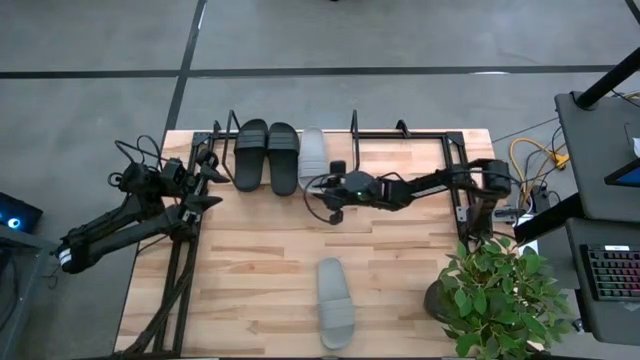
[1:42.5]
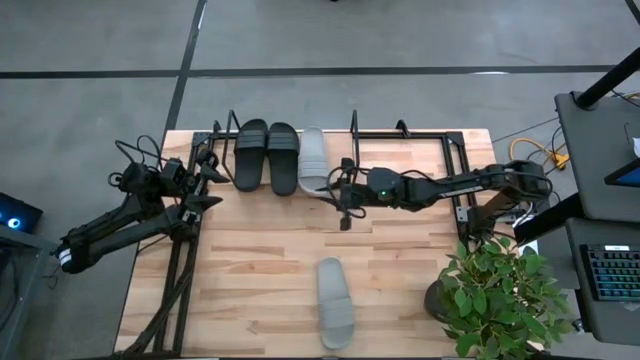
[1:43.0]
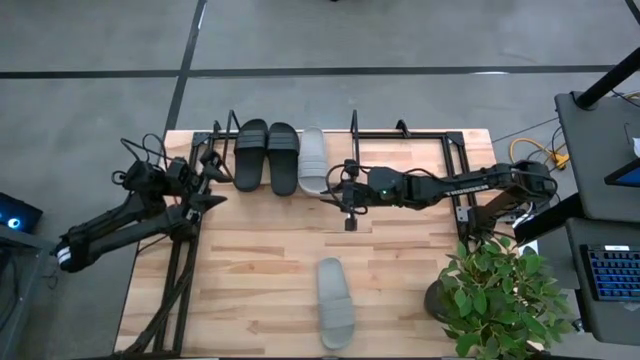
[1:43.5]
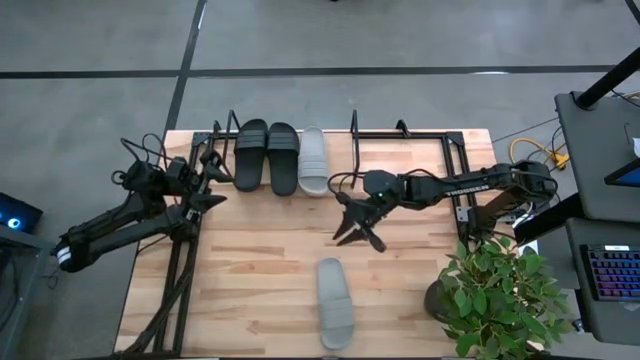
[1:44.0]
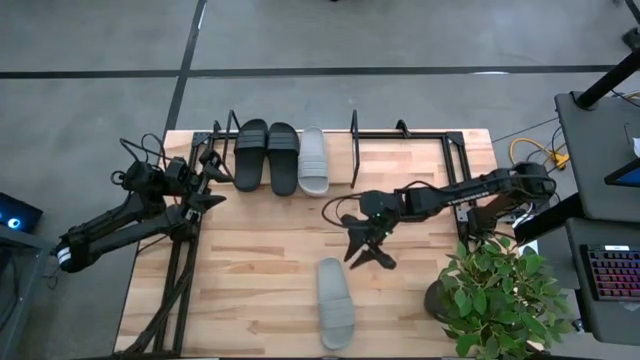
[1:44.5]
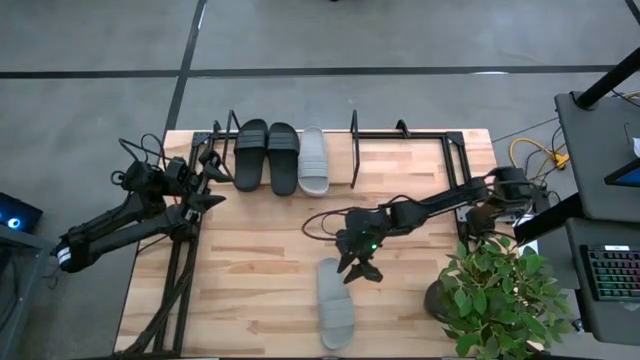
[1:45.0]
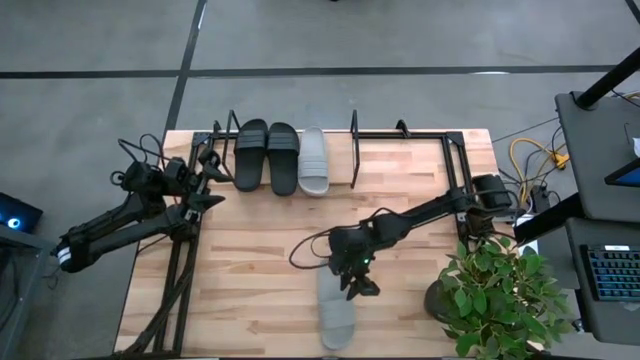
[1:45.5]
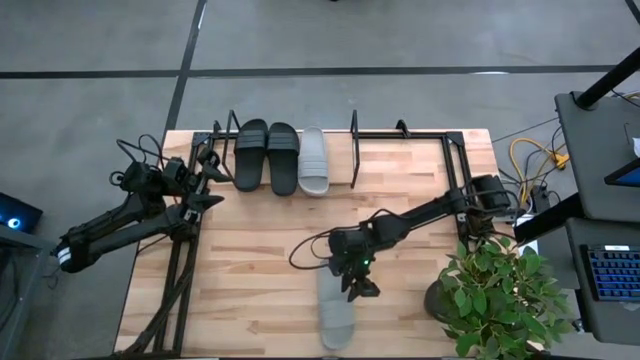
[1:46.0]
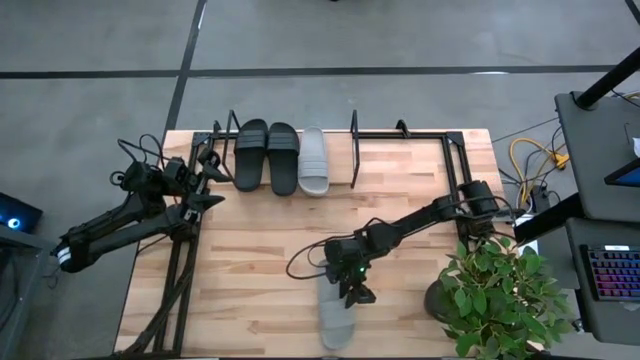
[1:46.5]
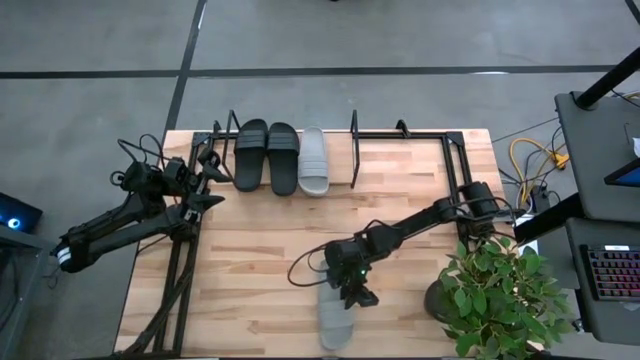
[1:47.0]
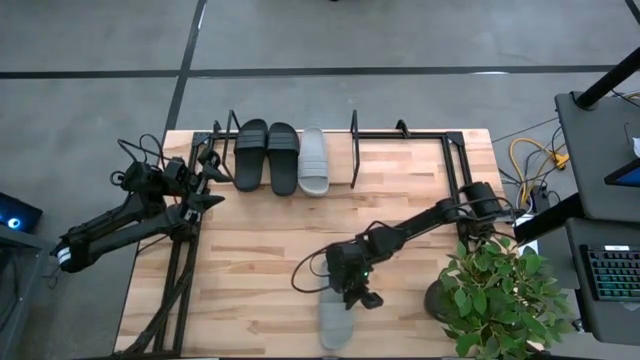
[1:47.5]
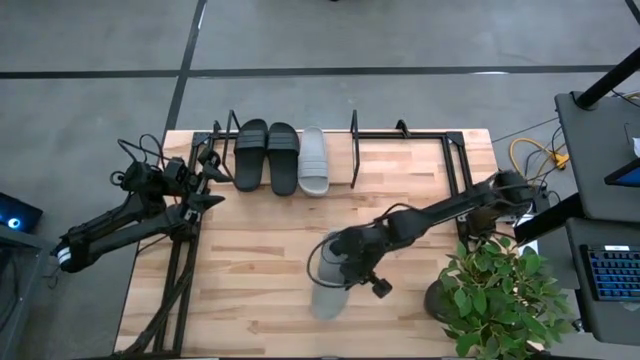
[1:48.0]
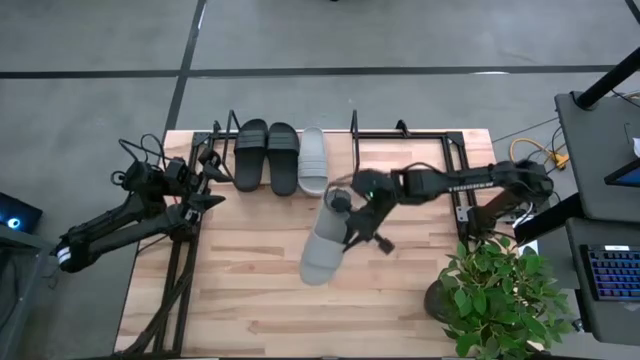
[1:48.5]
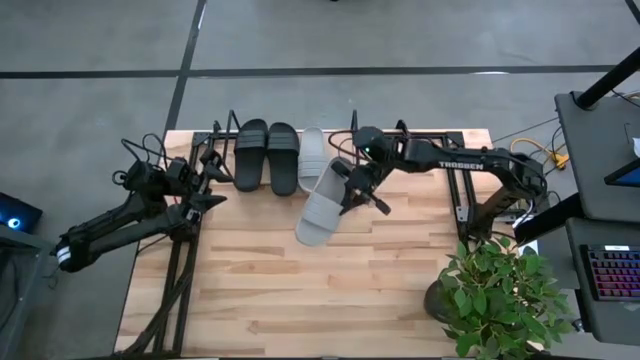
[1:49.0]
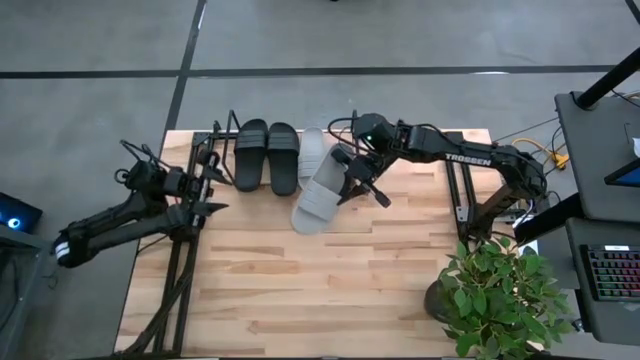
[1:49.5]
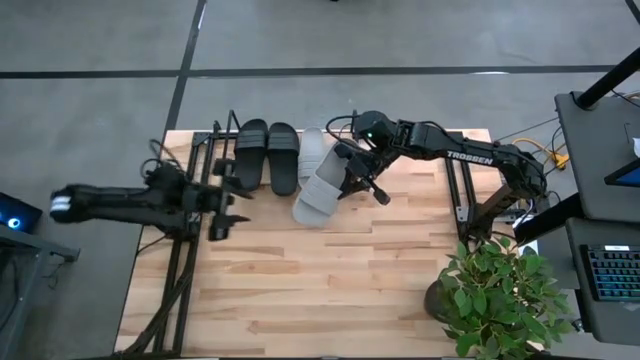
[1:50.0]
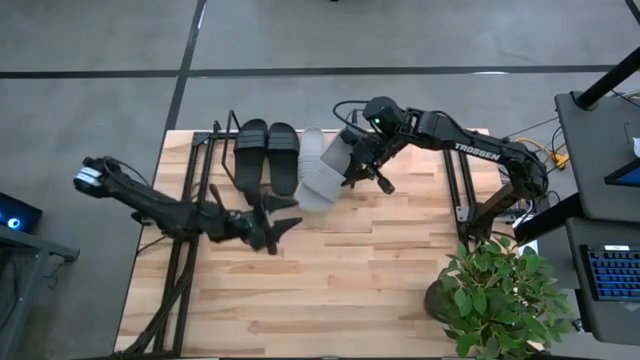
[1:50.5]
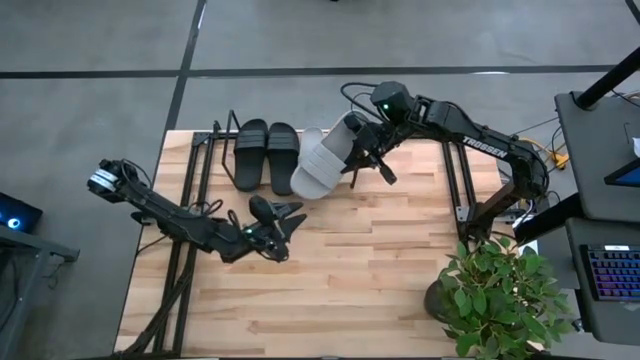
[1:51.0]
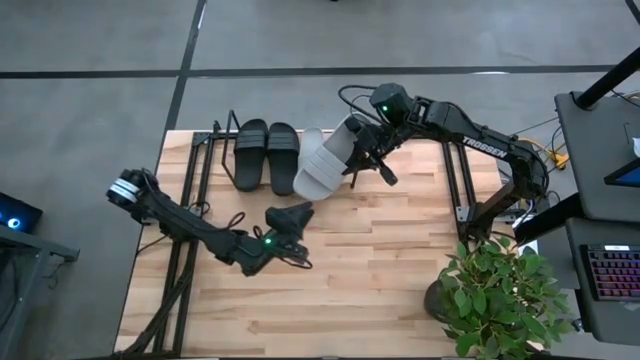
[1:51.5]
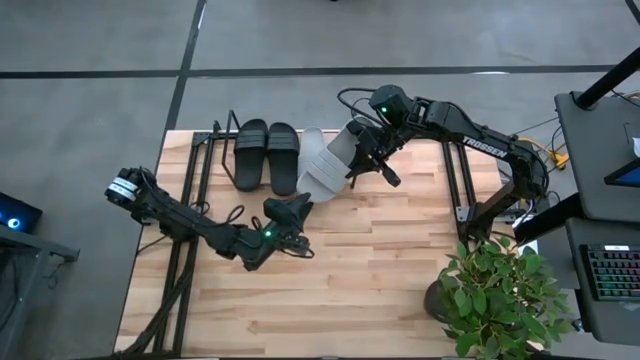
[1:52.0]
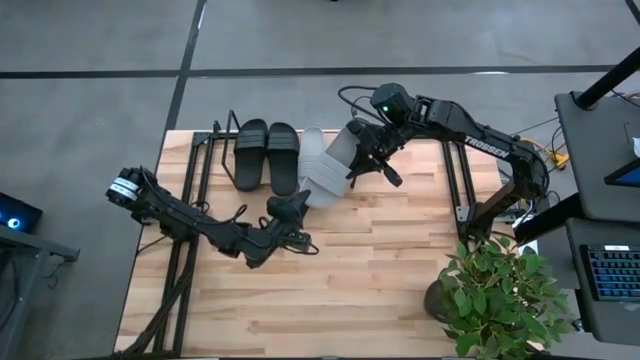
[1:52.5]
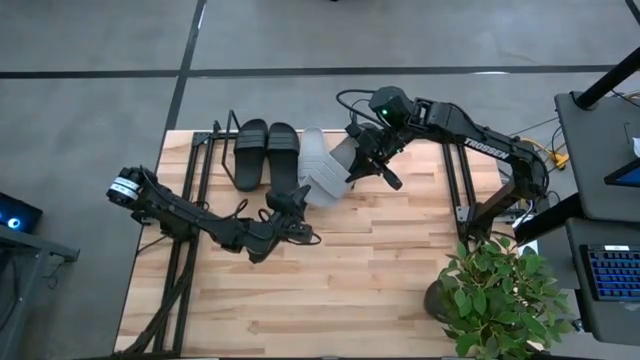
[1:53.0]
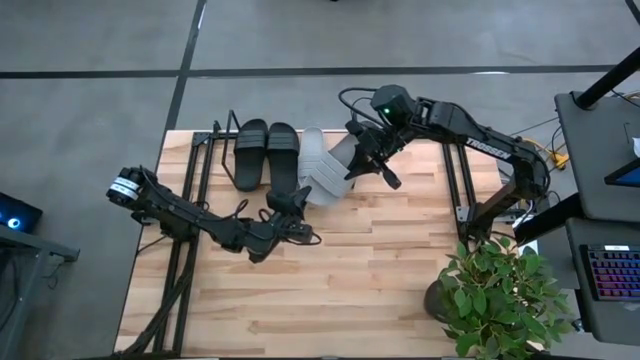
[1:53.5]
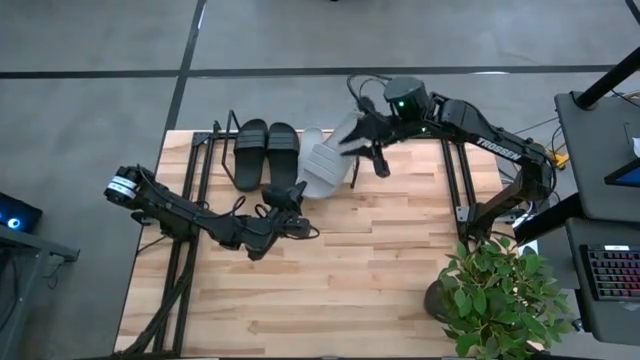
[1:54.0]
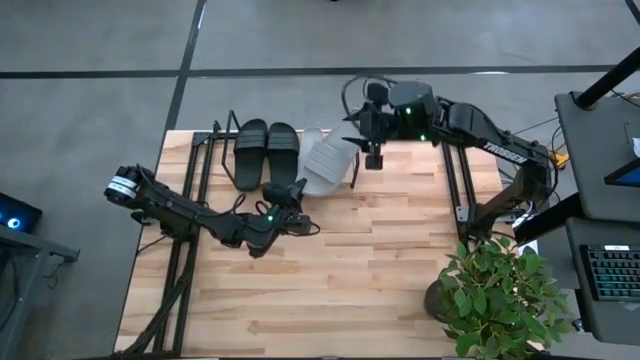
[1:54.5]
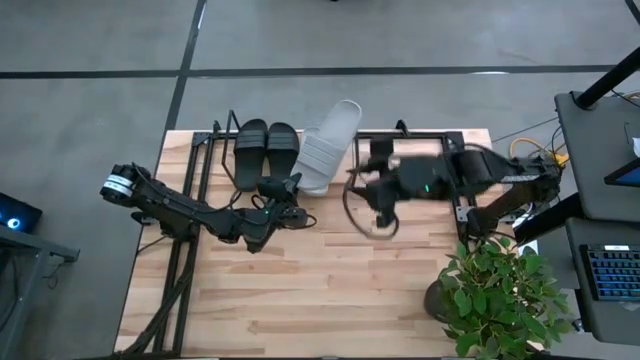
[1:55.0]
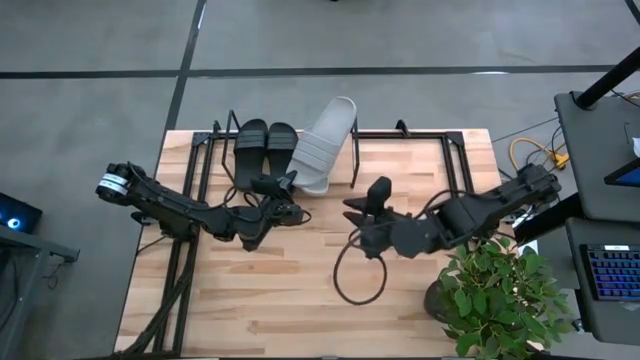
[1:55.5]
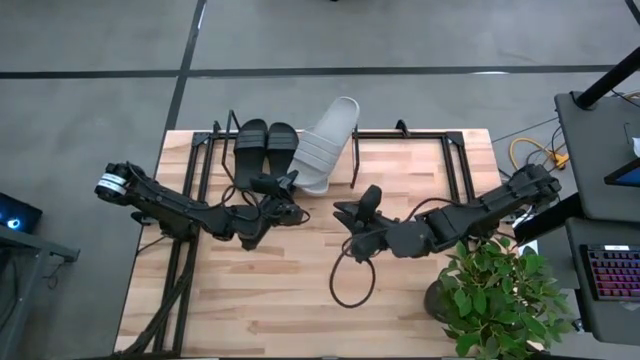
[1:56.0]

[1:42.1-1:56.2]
Task: Pick and place slides into the shelf
Put the gray slide on the shelf

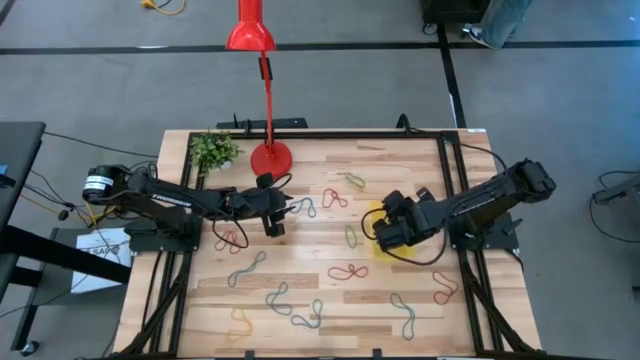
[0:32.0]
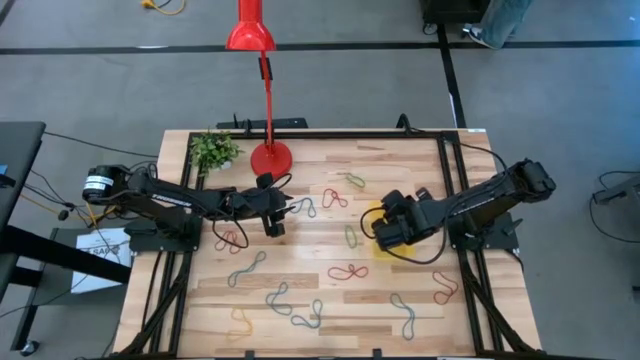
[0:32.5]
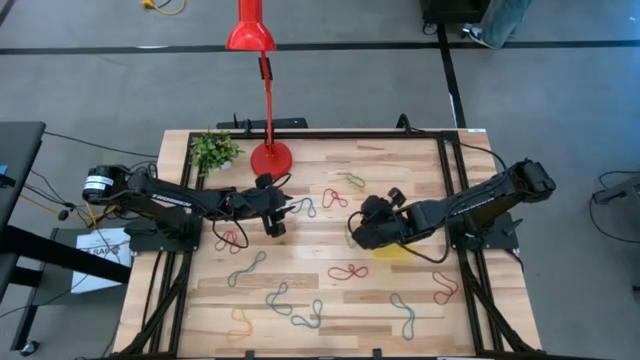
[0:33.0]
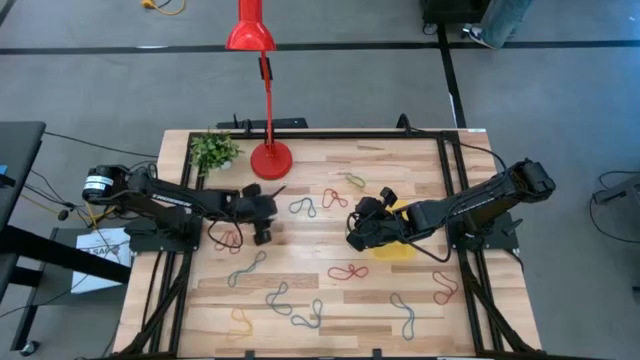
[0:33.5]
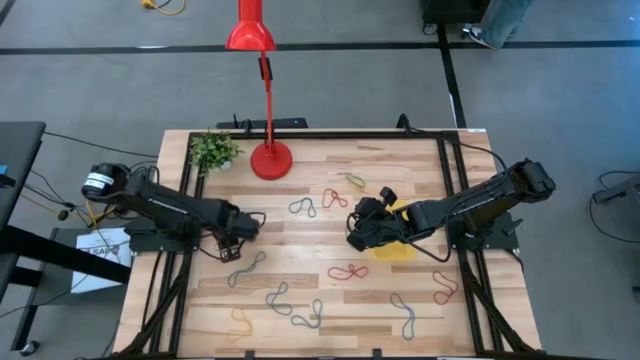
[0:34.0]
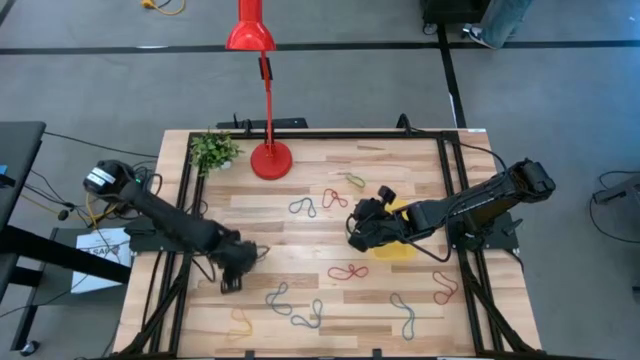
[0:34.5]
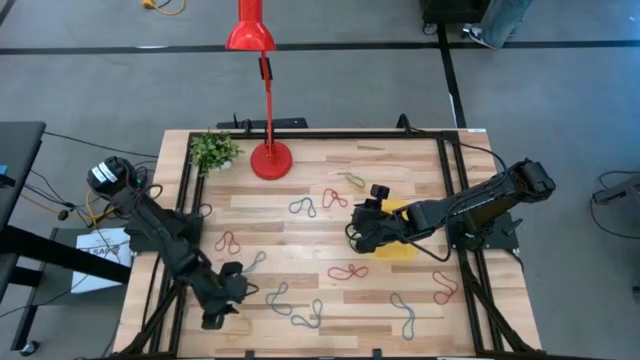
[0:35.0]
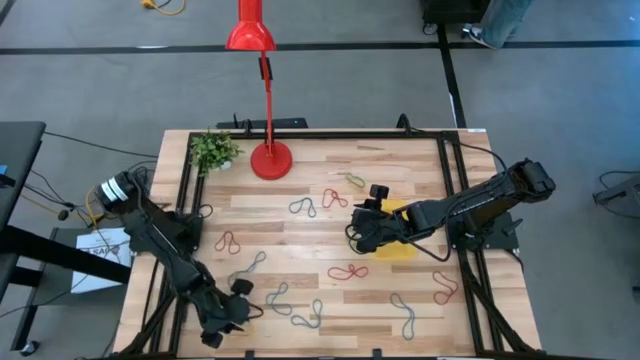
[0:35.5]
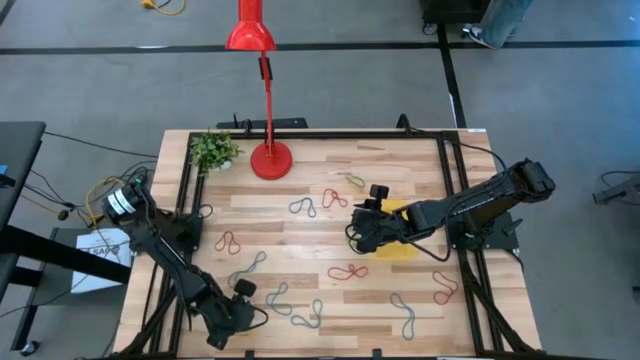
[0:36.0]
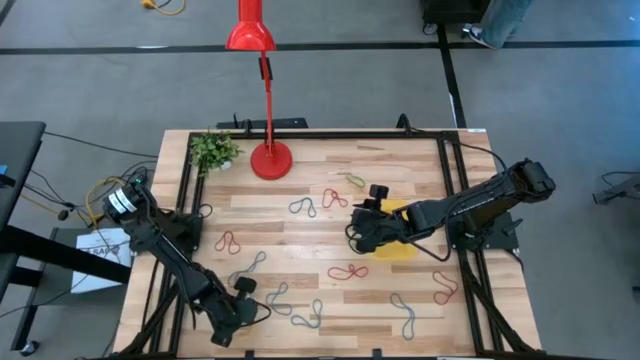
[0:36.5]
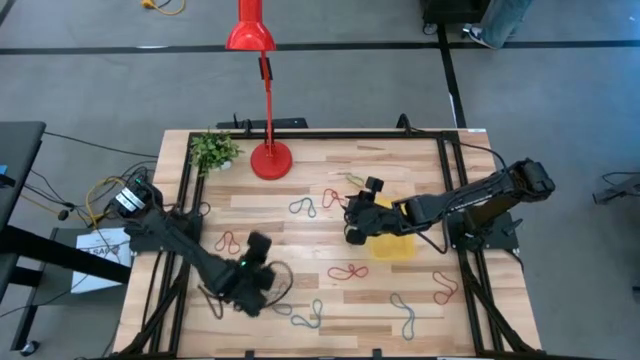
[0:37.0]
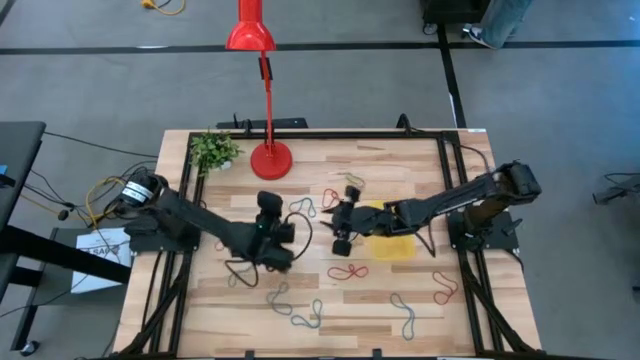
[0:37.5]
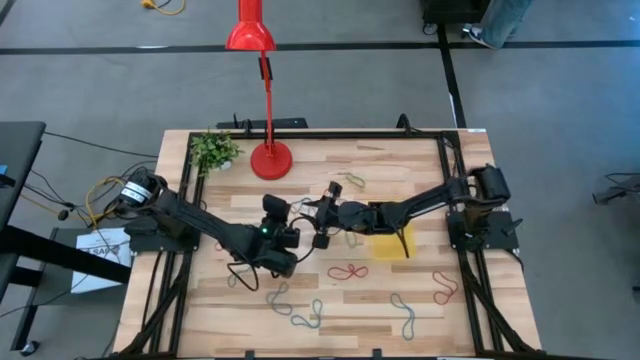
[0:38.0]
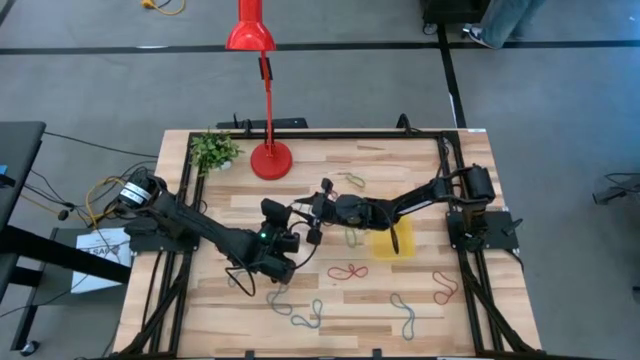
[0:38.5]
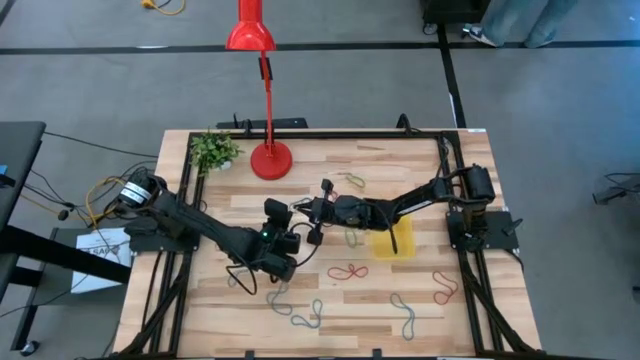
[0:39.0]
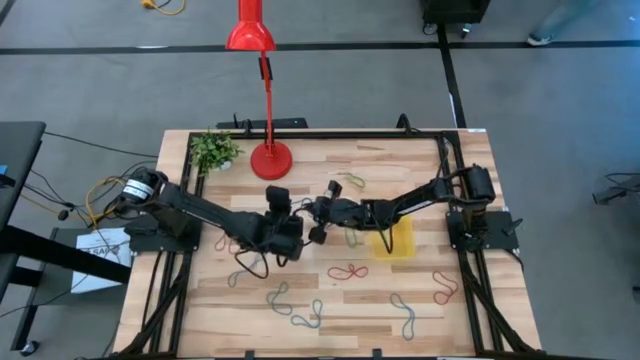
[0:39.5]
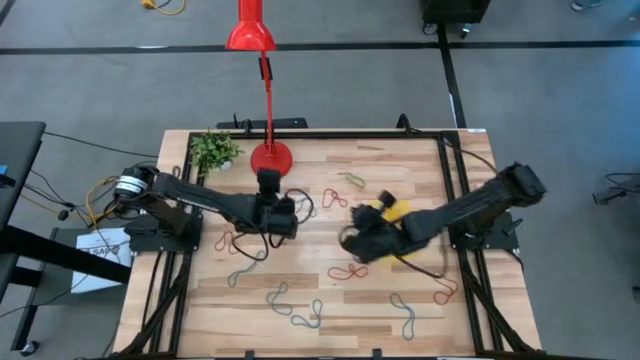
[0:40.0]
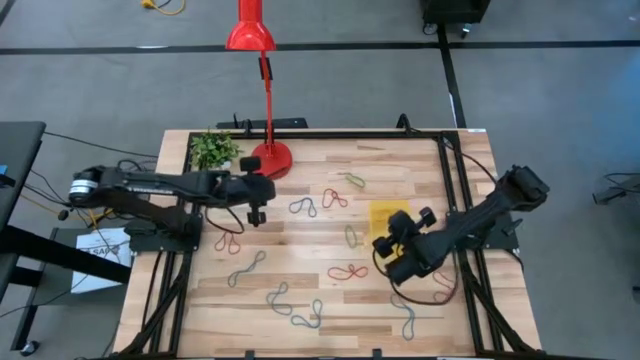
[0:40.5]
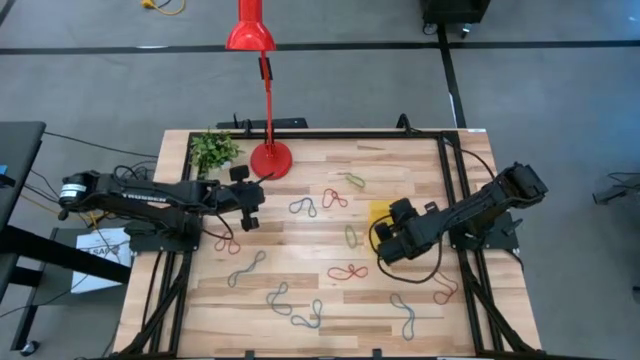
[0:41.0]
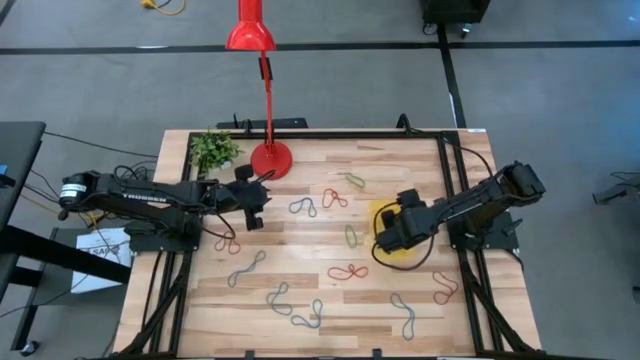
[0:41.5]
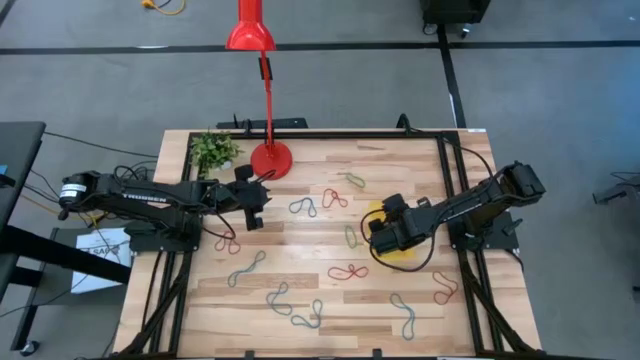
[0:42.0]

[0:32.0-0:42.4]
Task: Pick and place items into bin
Put the yellow rubber band into the yellow bin
